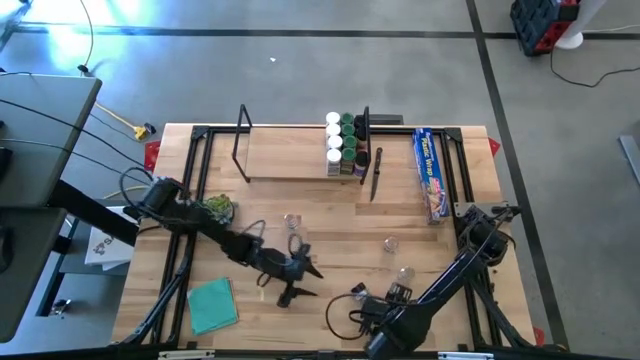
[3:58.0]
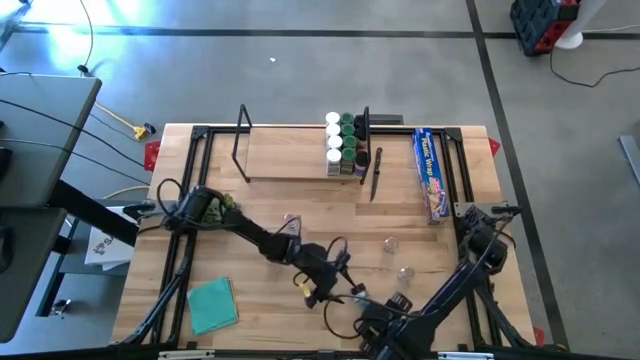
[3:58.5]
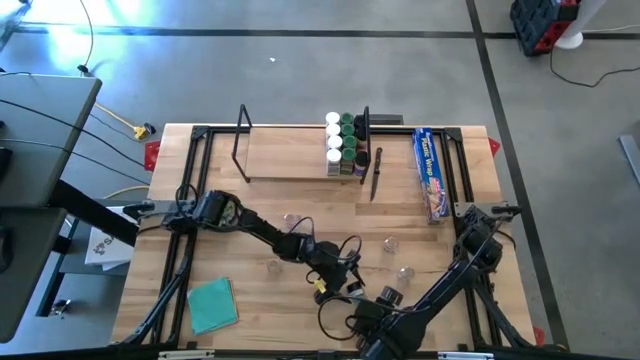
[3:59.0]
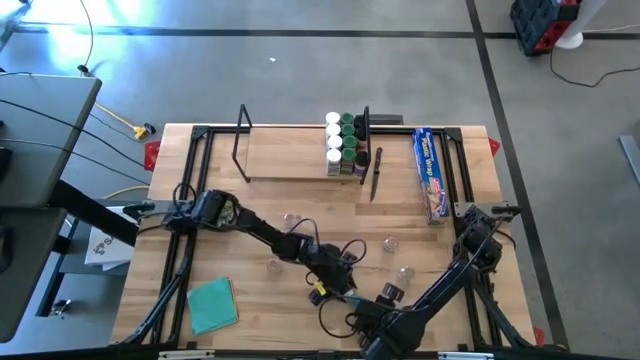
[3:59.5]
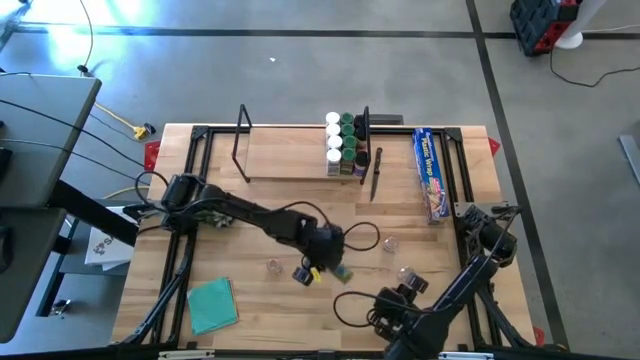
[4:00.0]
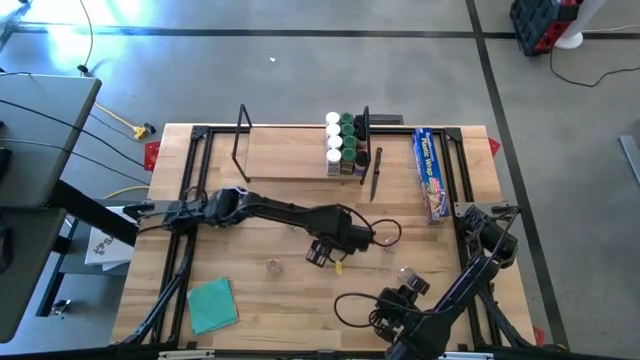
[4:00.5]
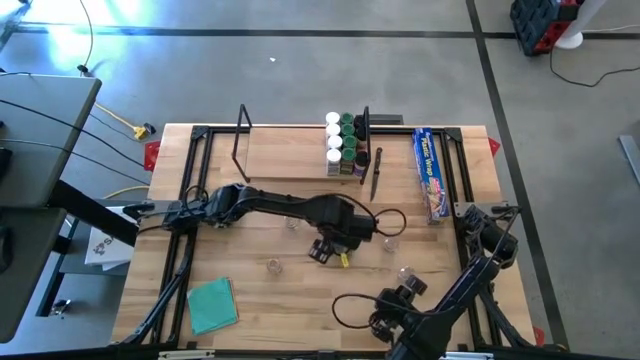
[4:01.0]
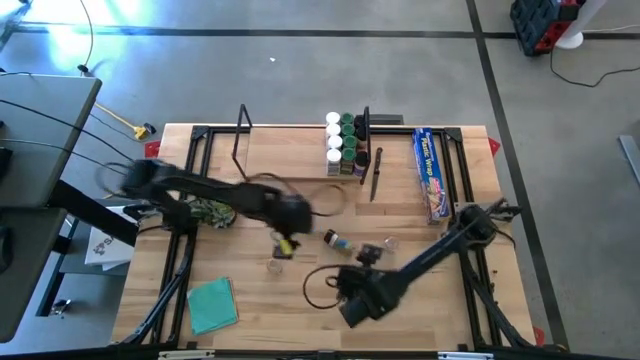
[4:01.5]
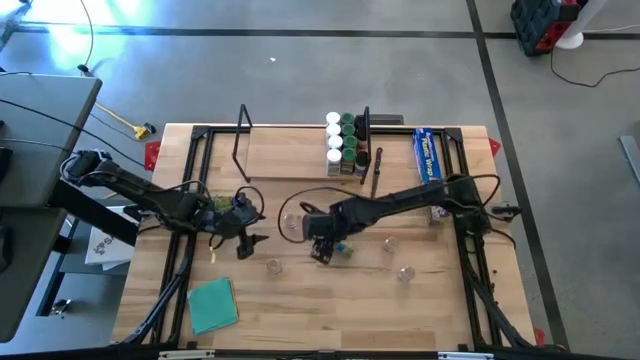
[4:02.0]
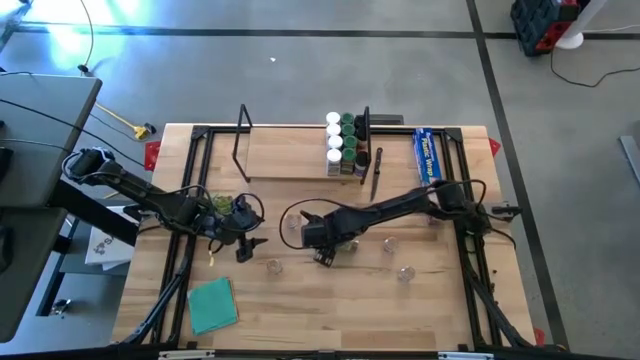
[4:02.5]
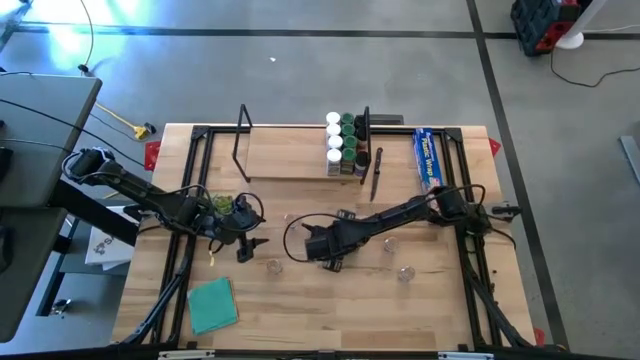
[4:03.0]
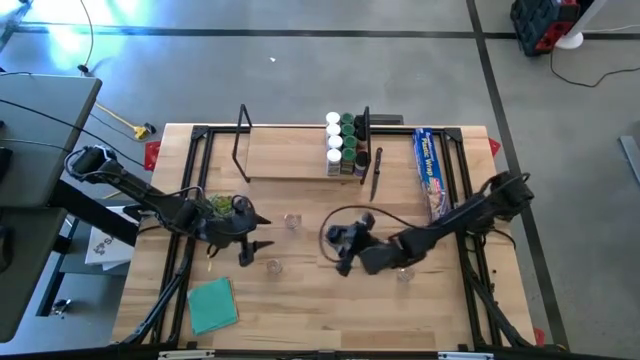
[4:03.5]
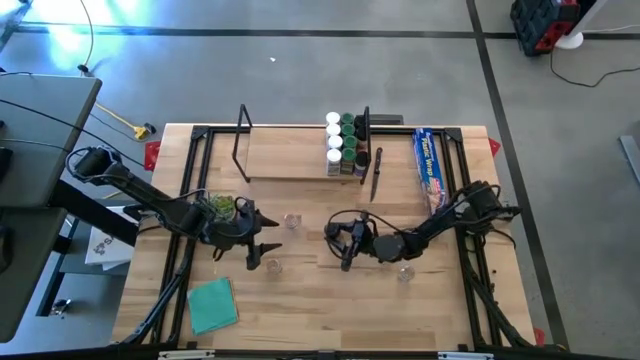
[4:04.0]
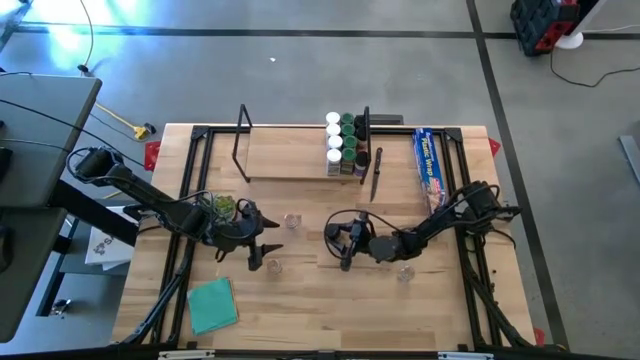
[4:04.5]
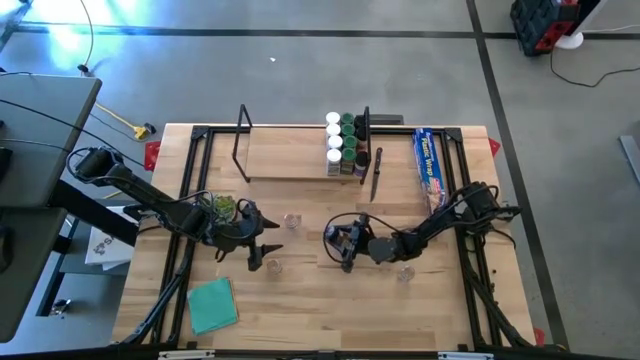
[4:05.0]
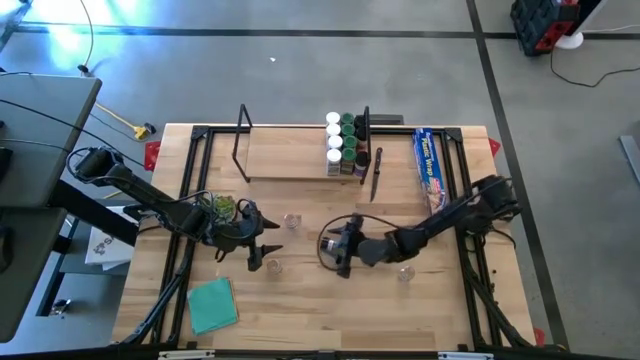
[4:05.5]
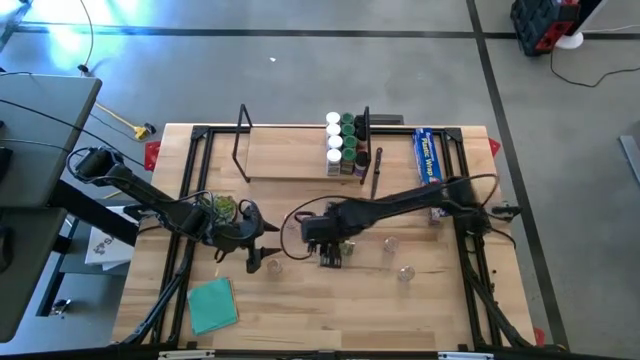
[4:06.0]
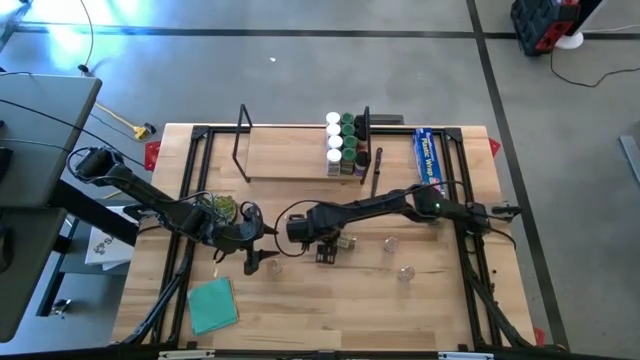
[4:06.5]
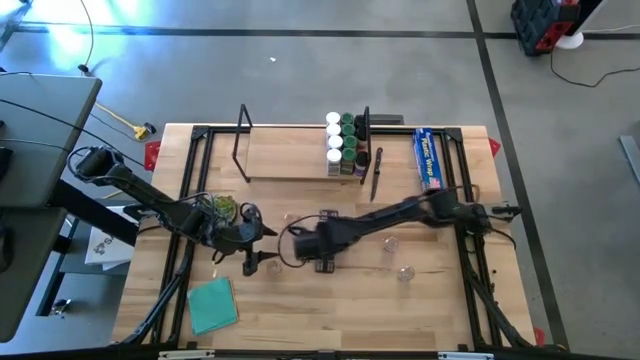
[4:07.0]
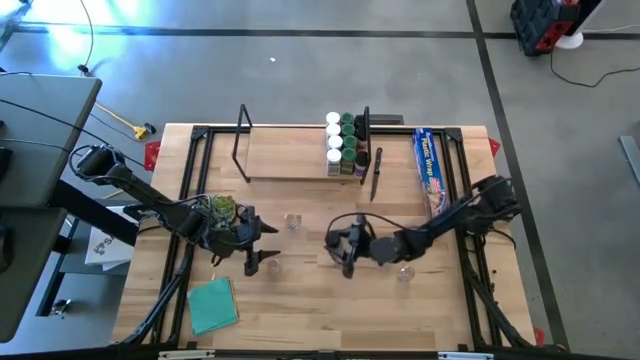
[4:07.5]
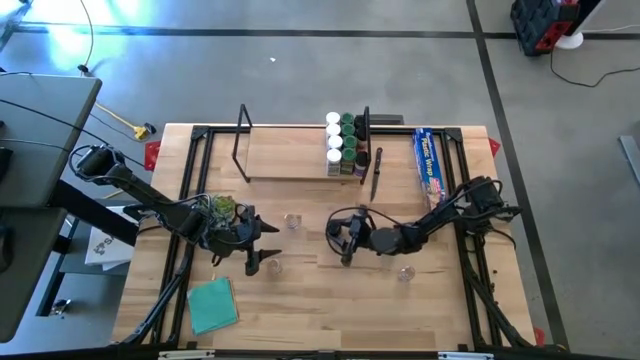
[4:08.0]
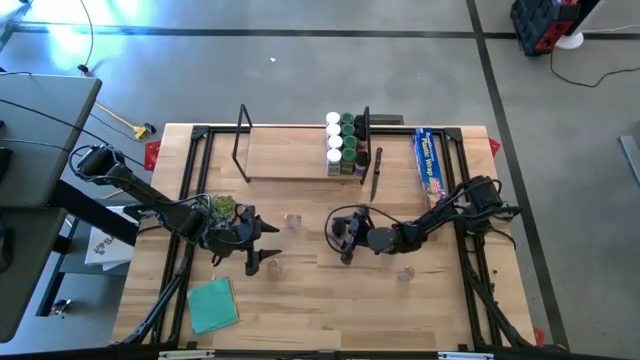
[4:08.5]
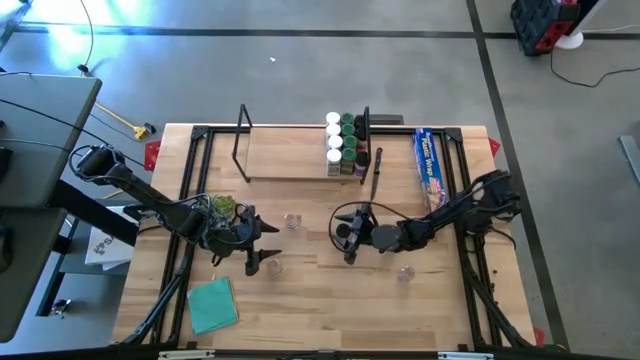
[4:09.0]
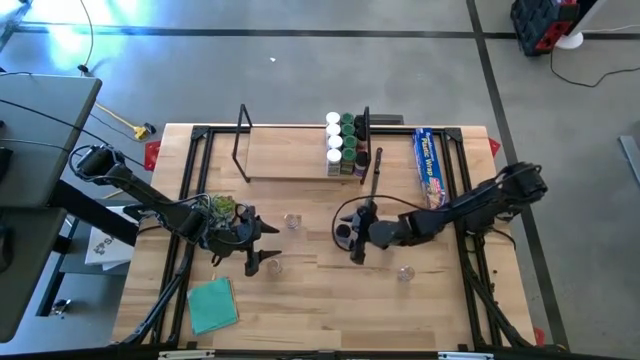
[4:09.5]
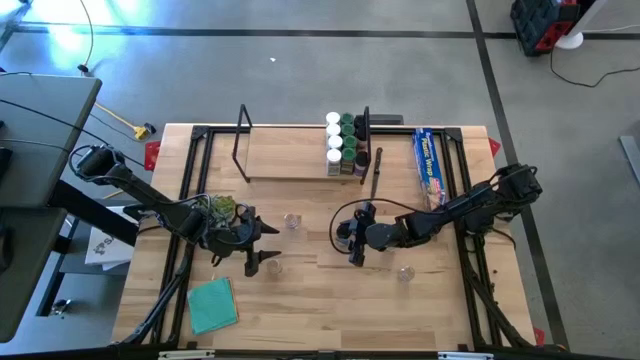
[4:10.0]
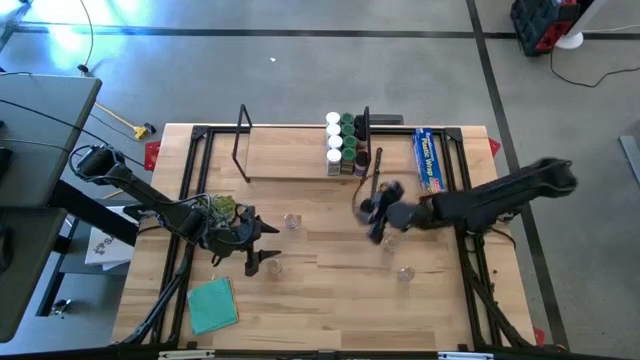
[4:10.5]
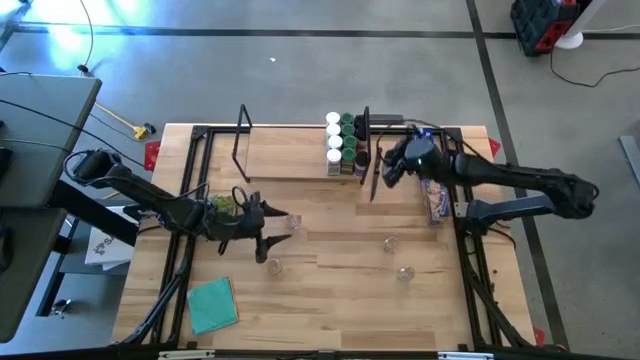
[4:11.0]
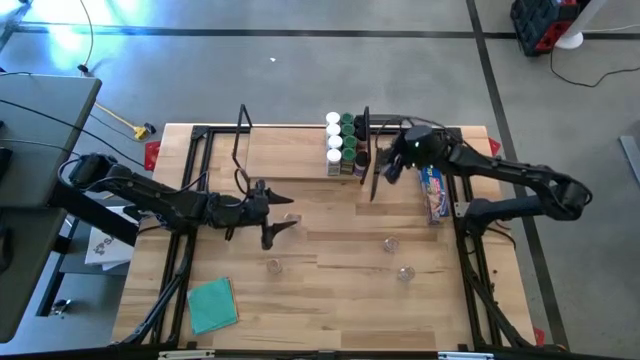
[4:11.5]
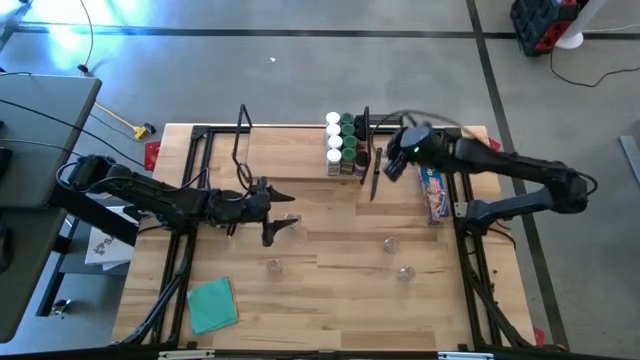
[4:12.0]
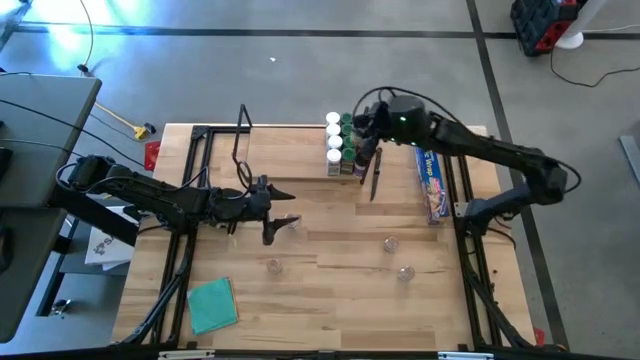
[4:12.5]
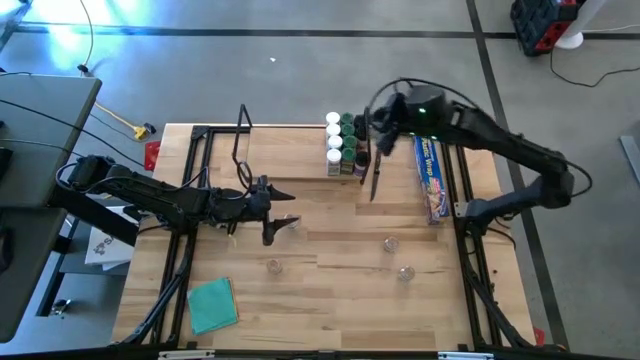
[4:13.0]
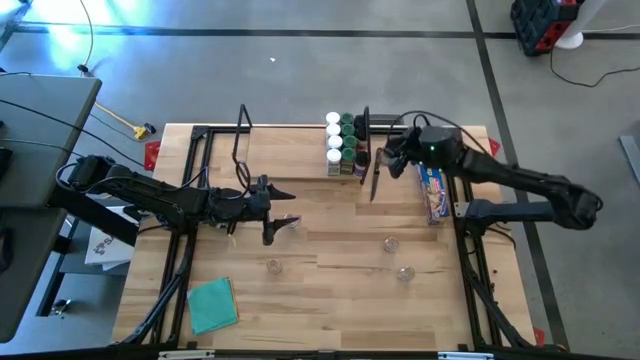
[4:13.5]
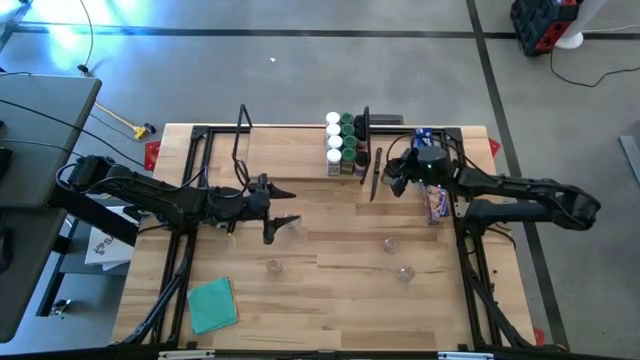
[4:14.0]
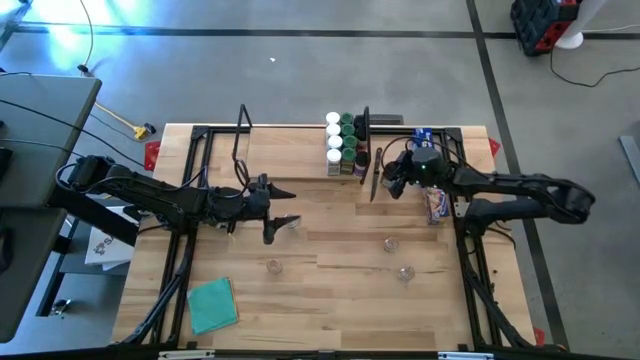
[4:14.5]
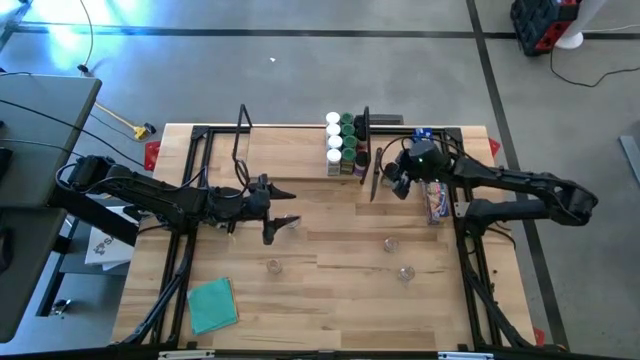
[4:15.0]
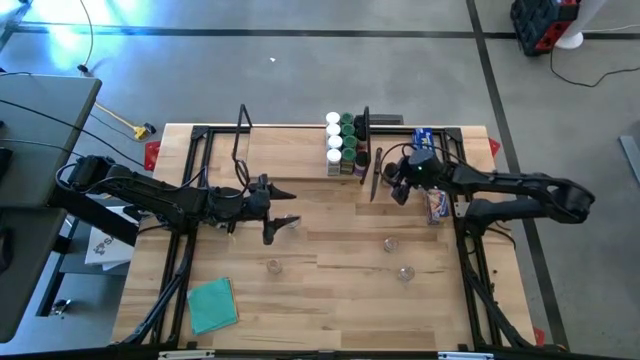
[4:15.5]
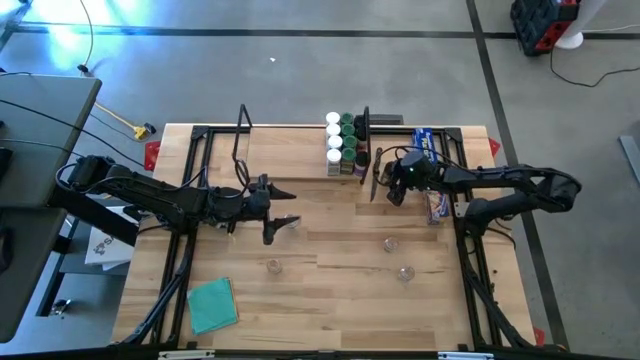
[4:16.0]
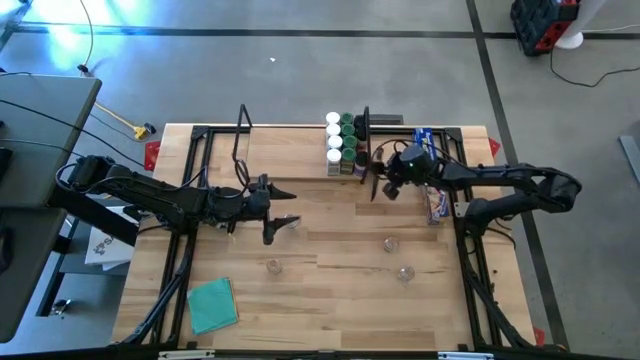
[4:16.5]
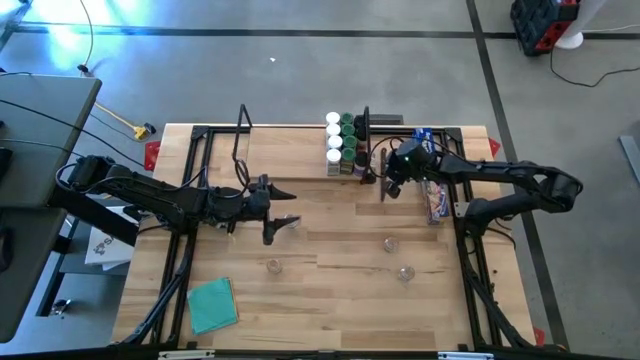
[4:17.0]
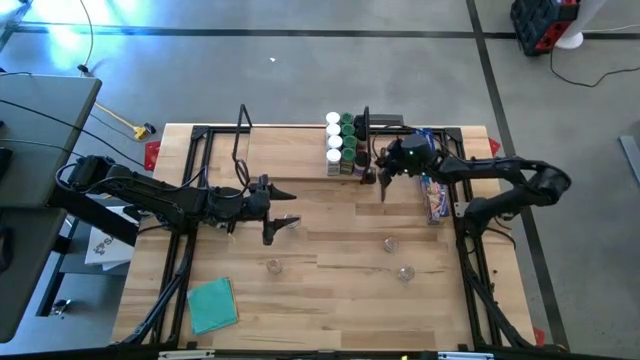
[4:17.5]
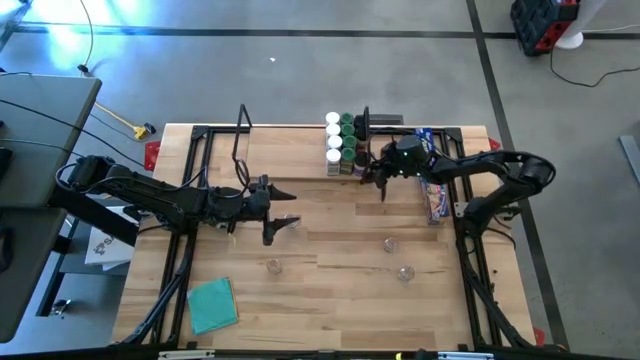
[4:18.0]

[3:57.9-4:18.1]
Task: Shelf spices
Adjust the black seasoning bottles on the shelf
